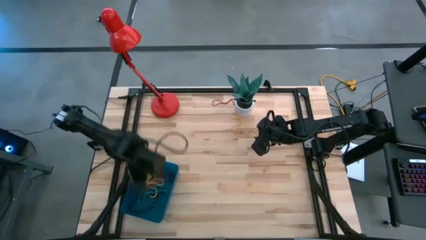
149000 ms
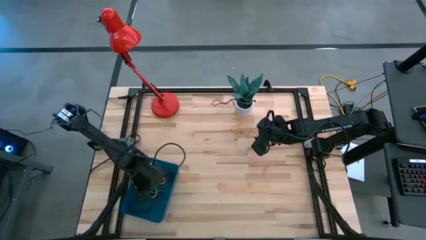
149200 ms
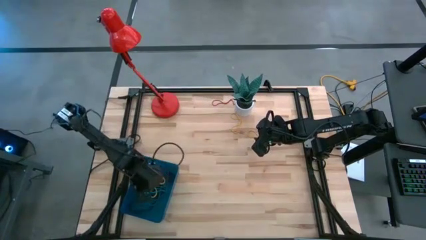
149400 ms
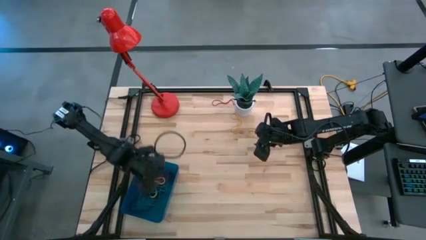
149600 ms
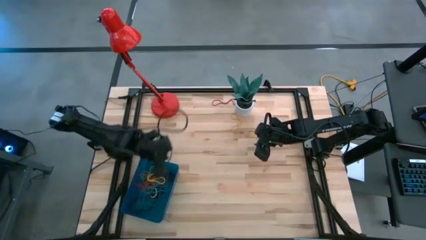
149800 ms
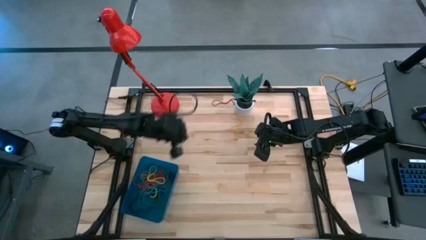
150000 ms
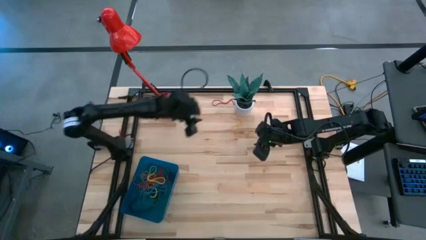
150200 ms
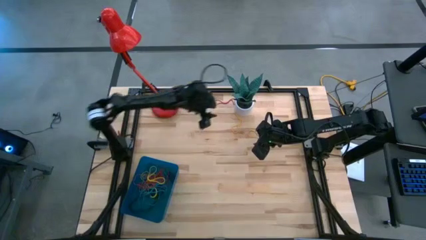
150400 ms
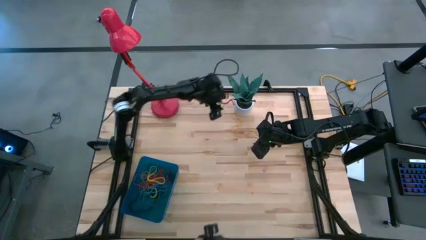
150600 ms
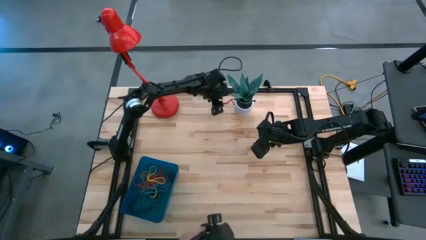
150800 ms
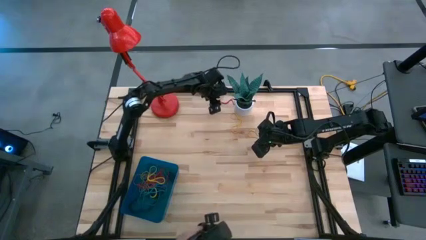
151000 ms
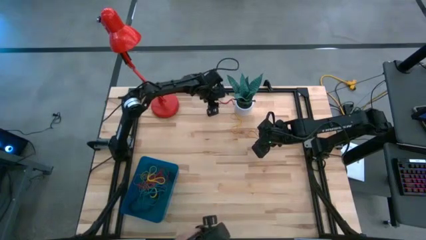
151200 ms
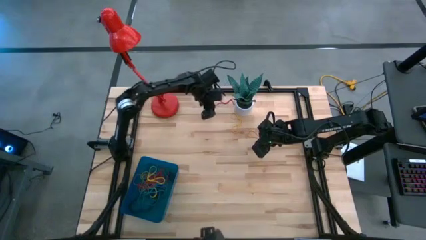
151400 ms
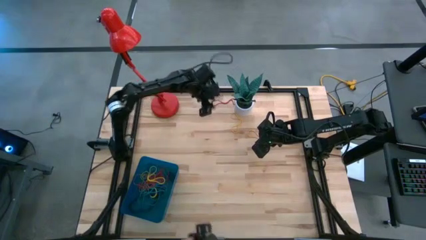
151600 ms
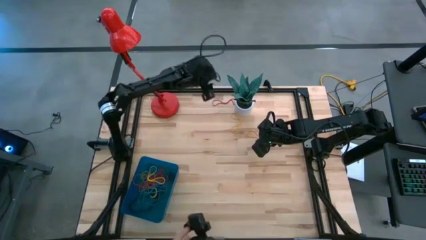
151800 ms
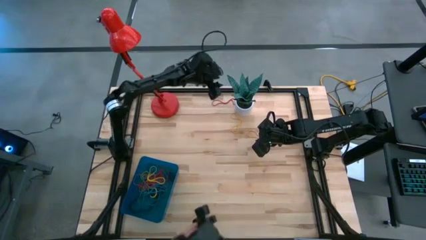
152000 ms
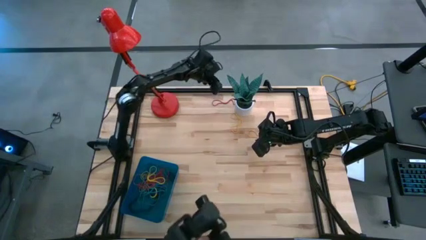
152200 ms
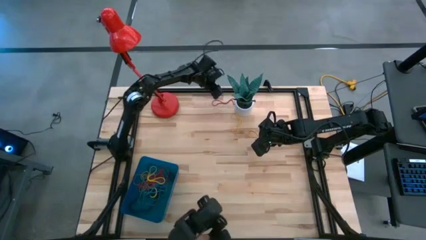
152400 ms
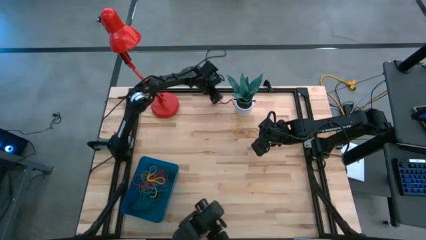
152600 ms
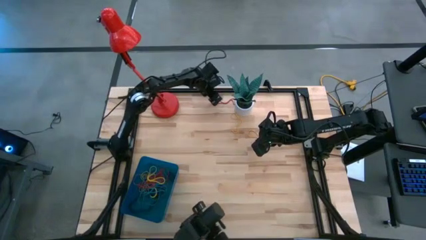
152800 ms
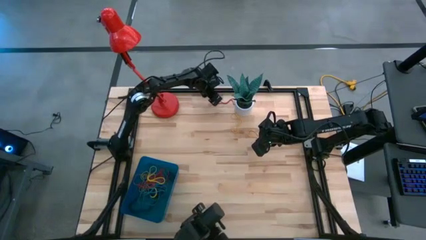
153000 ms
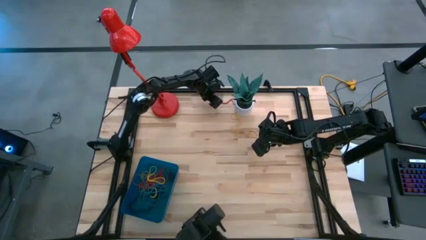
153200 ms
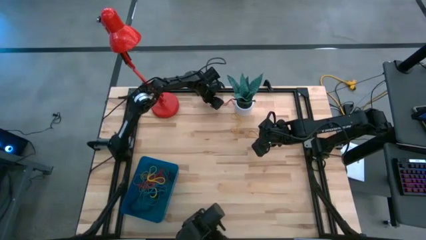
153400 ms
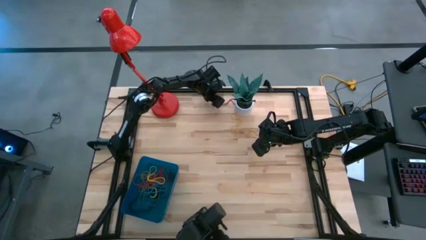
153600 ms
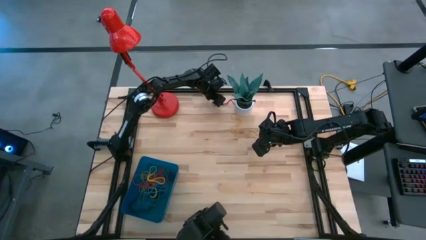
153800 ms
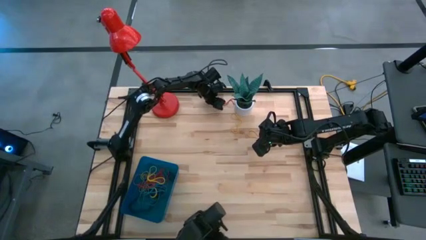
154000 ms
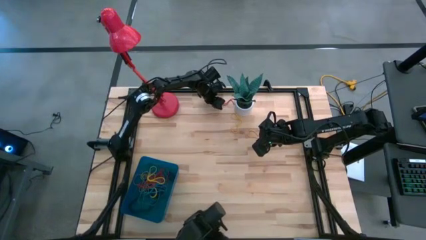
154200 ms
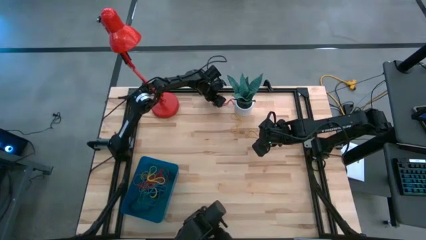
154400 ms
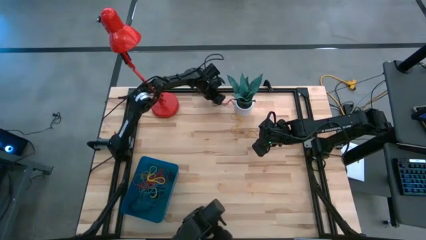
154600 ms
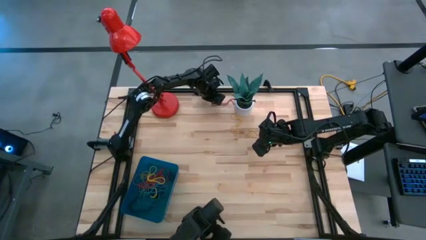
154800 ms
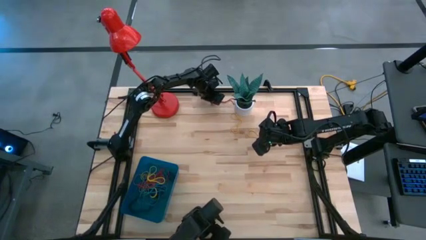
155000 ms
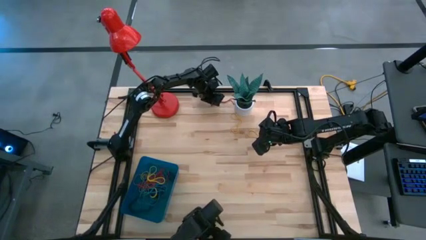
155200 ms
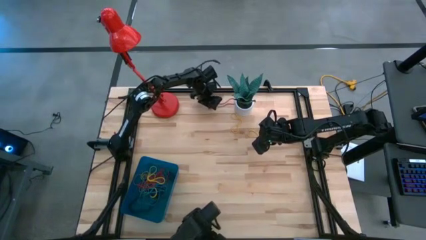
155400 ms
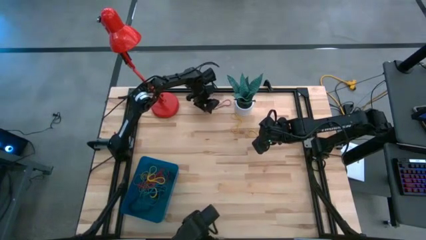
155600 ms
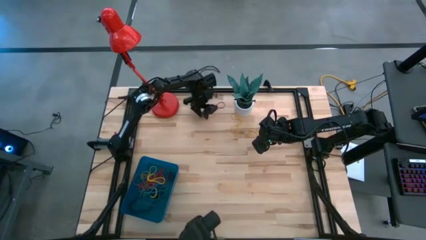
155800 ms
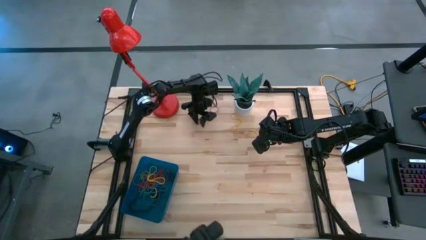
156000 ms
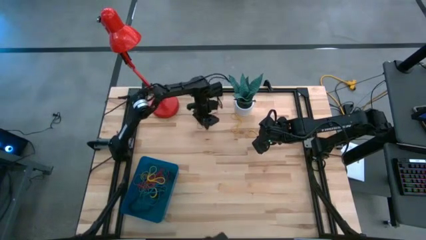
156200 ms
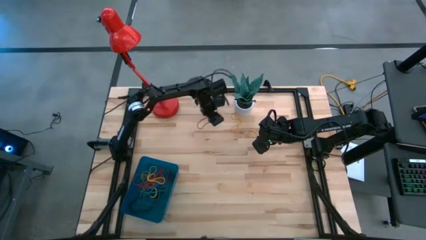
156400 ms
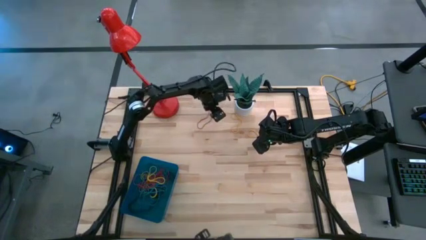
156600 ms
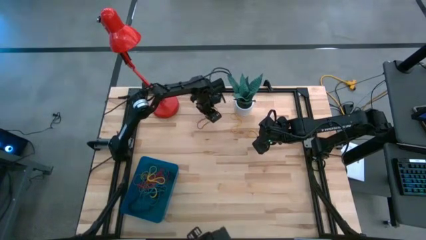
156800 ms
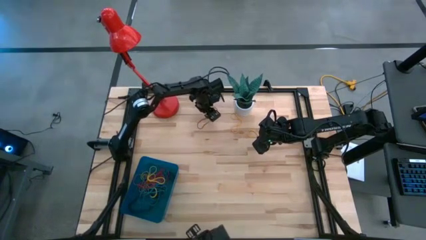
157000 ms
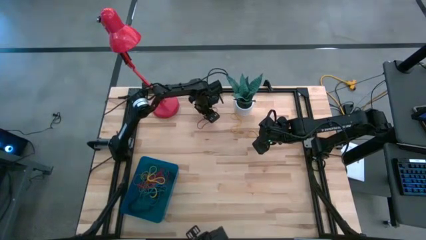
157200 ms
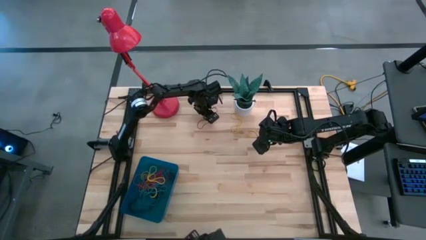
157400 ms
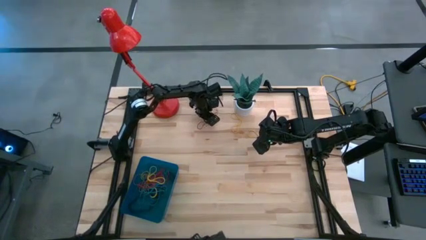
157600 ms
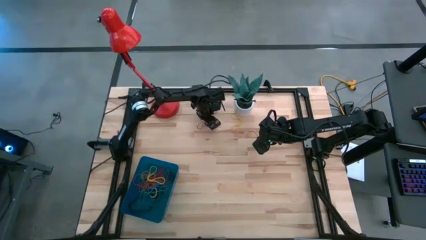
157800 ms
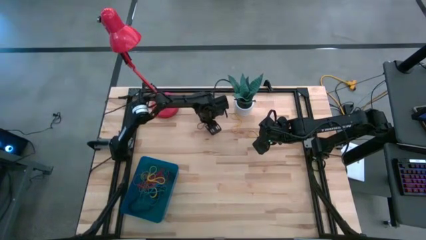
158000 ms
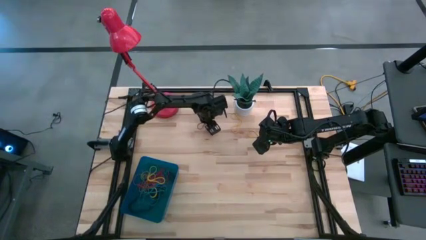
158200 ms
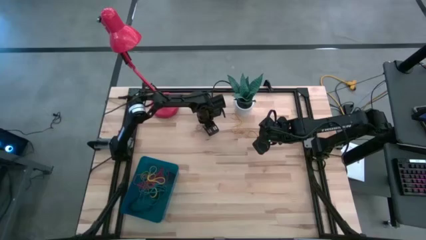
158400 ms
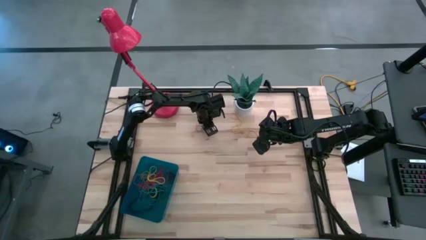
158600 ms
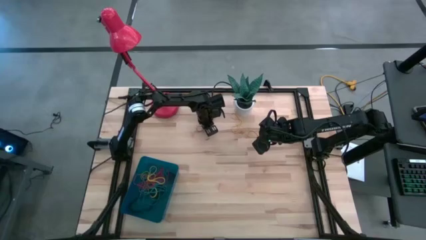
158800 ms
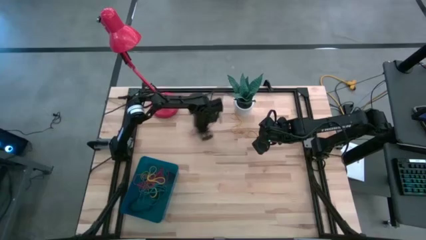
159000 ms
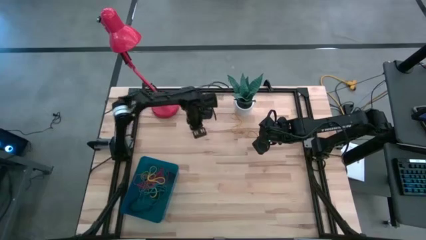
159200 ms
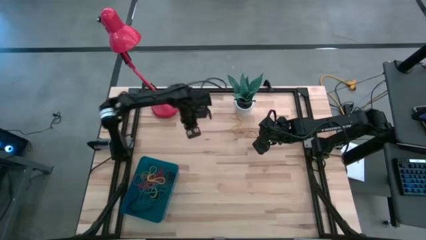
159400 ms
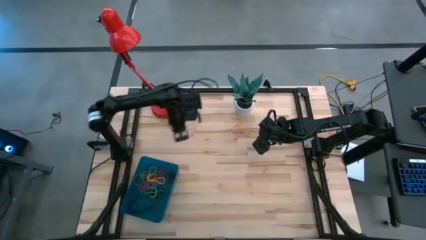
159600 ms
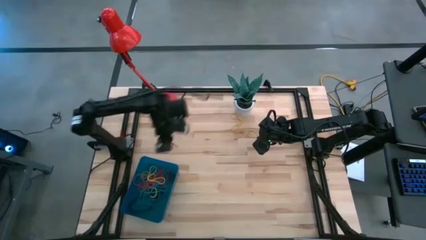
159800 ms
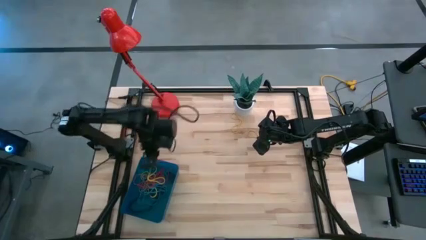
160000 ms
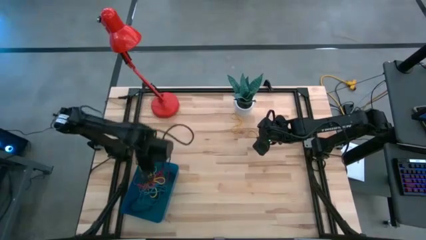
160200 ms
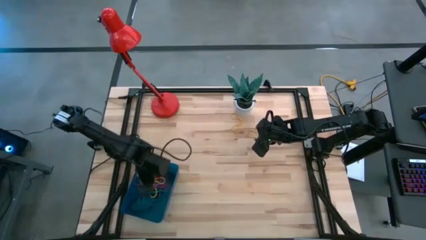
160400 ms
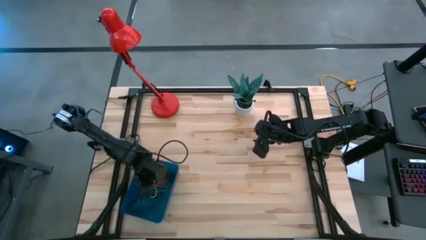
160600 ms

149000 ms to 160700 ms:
Task: Pick and place rubber bands into bin
Put the red rubber band into the blue bin

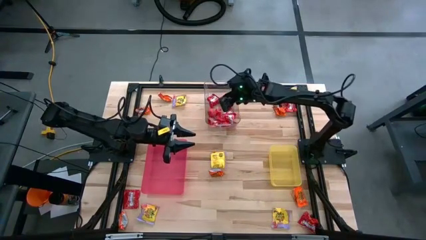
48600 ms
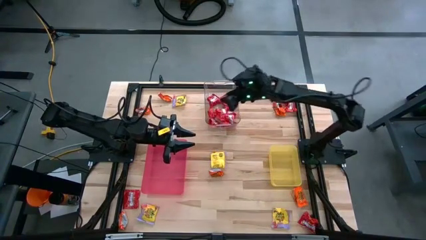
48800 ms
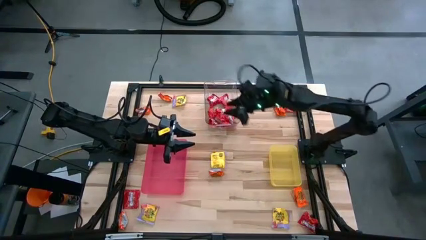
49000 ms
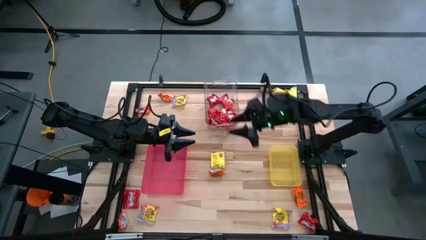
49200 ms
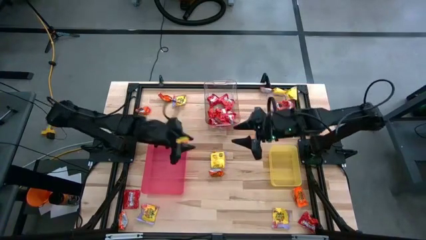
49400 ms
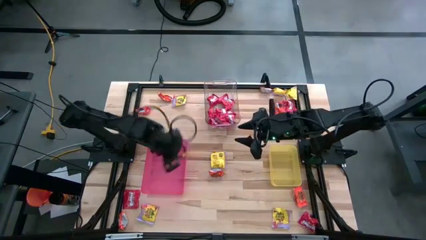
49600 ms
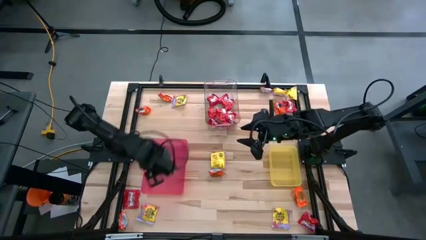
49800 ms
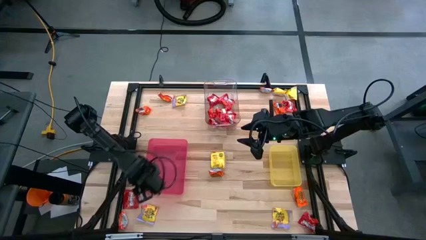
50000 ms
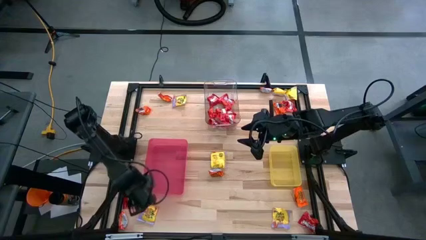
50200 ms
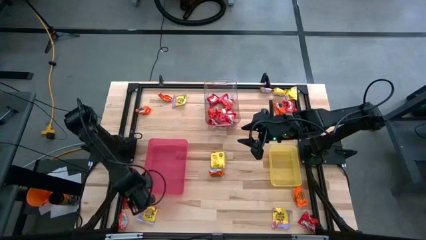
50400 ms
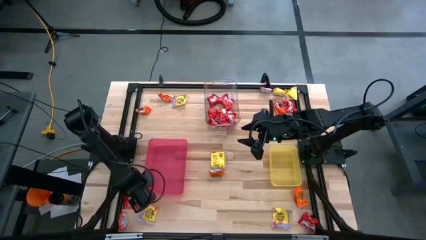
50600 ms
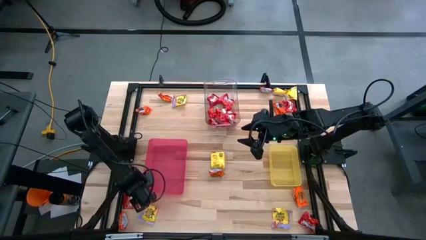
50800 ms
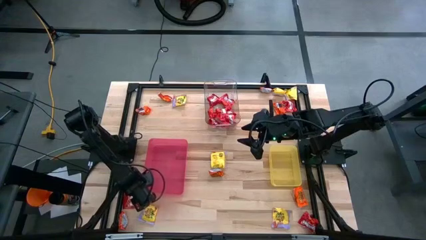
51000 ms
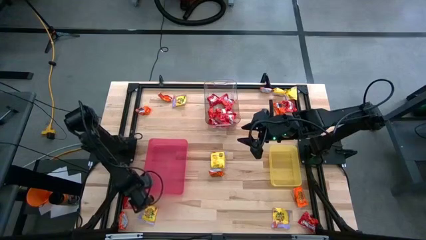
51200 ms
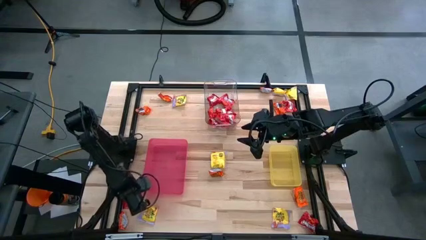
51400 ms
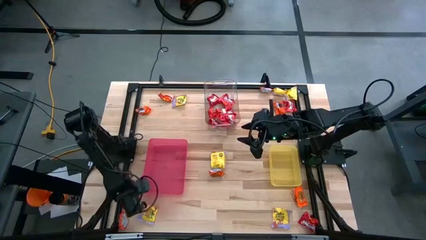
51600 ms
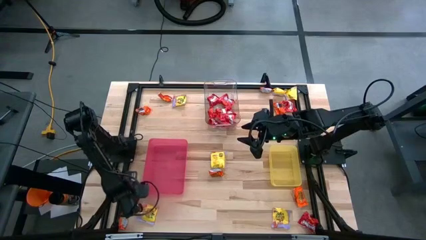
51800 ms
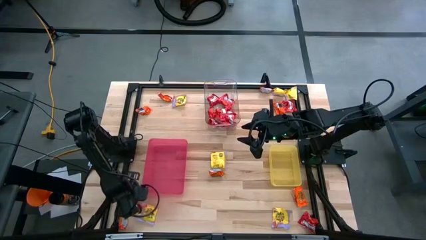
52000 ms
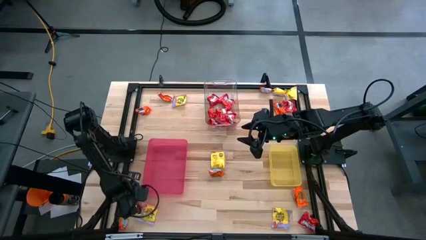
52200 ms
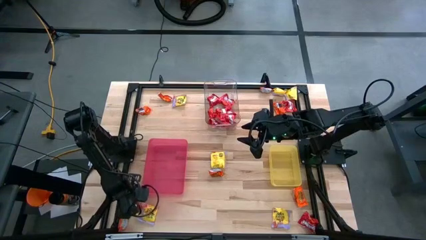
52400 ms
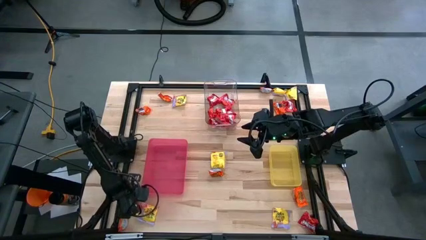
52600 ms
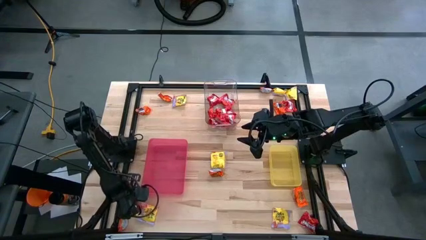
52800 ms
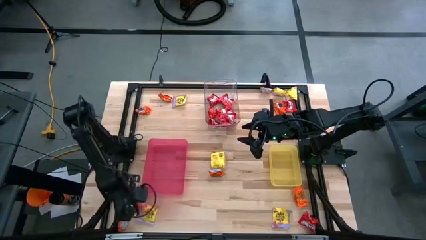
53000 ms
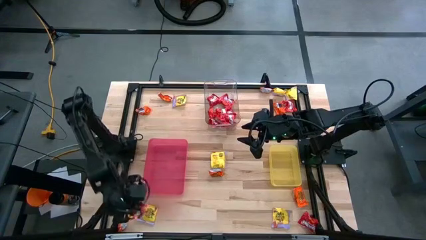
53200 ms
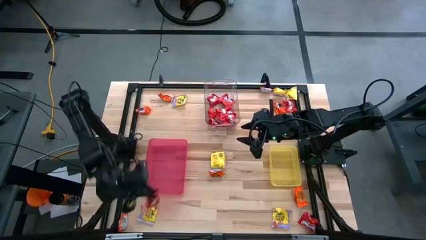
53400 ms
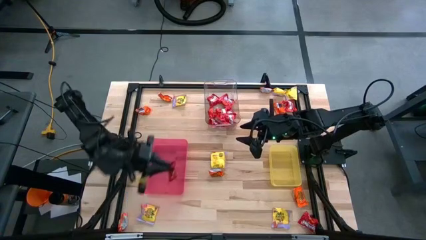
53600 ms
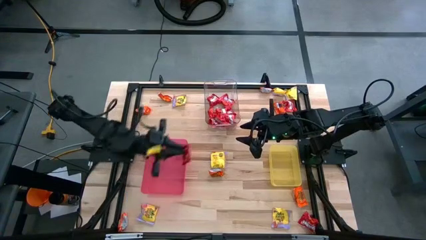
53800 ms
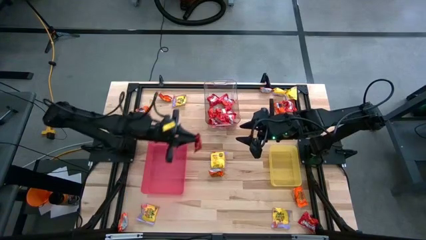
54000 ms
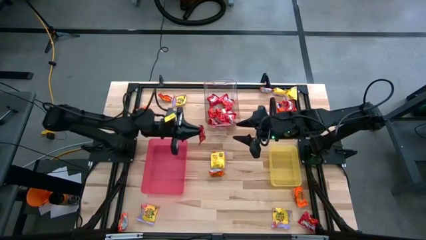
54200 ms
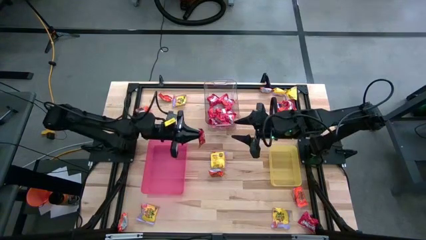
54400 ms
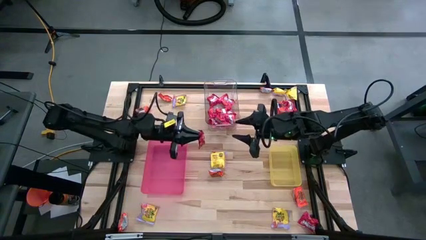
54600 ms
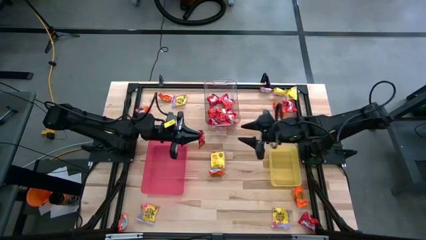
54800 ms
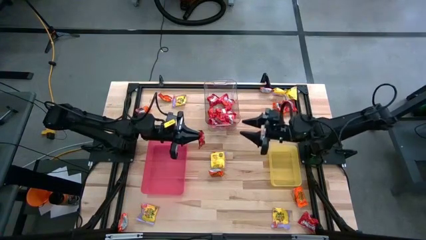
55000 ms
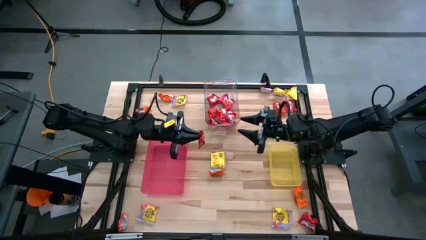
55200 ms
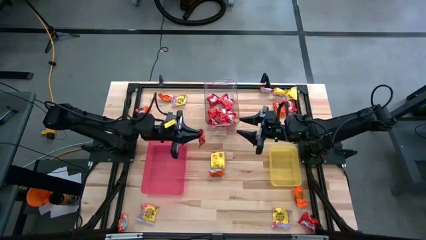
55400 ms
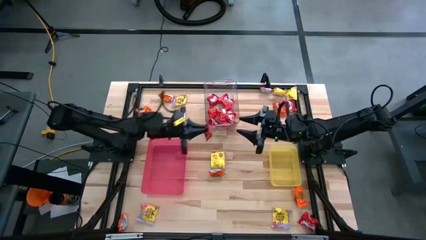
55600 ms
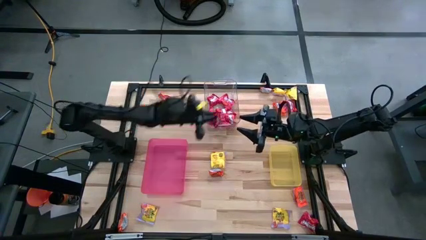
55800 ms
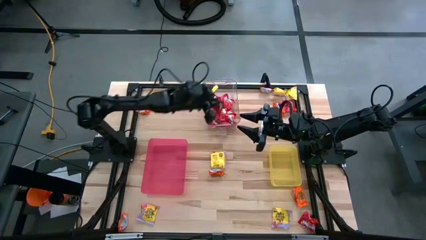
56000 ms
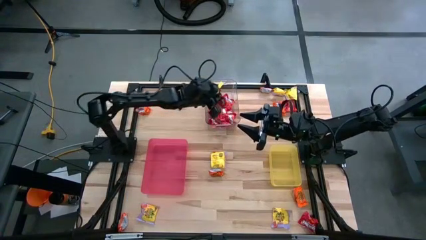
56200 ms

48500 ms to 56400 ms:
Task: Sort candy
Put the red candy into the transparent bin
